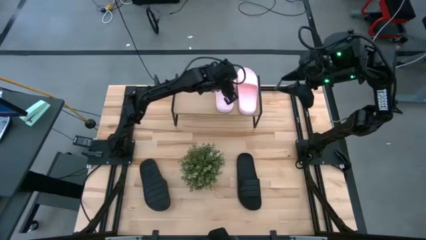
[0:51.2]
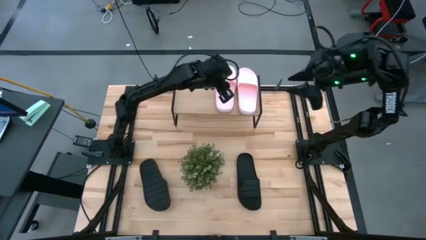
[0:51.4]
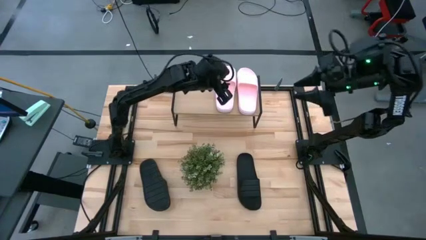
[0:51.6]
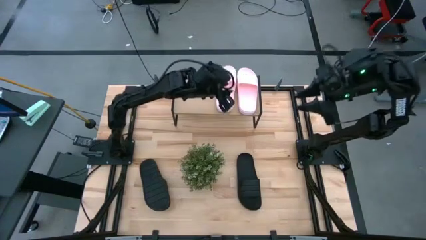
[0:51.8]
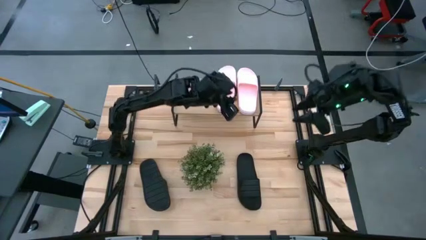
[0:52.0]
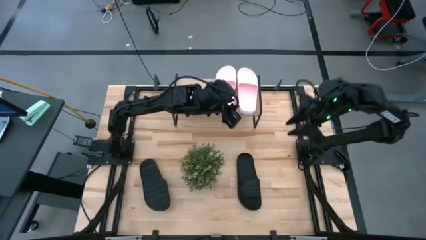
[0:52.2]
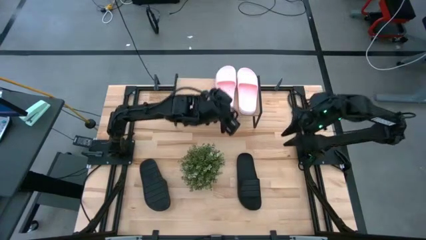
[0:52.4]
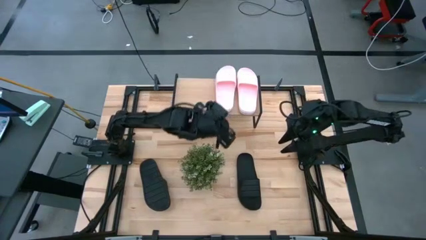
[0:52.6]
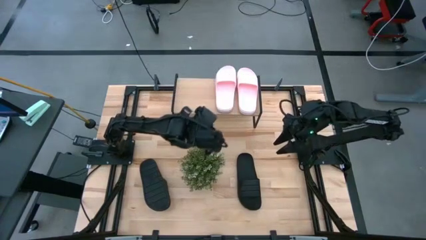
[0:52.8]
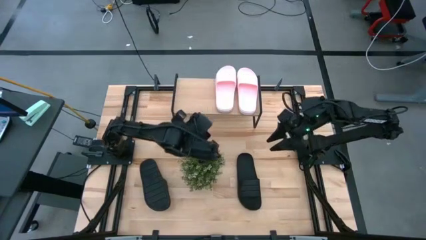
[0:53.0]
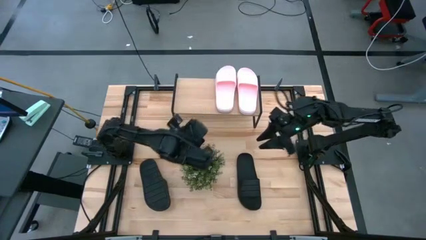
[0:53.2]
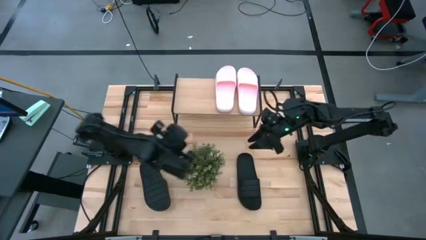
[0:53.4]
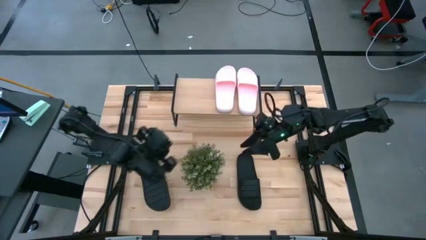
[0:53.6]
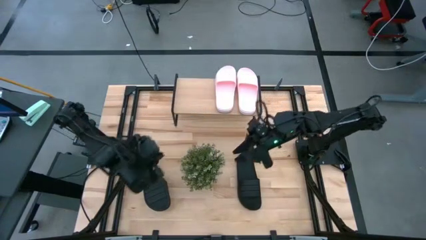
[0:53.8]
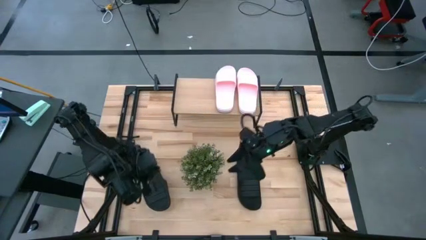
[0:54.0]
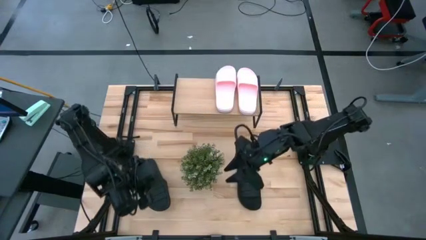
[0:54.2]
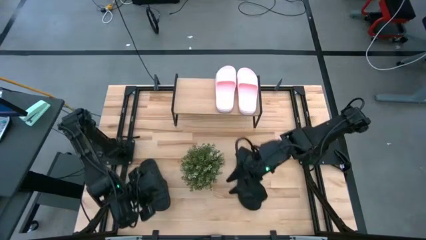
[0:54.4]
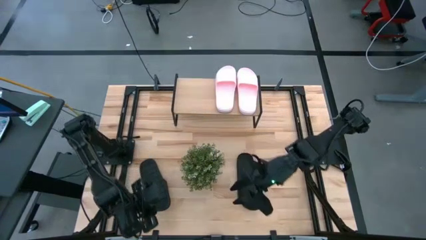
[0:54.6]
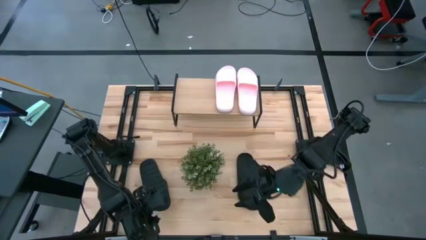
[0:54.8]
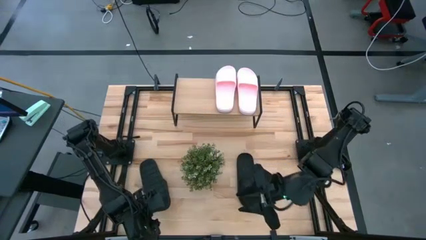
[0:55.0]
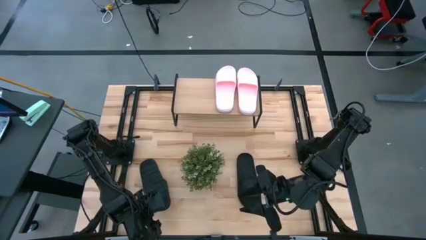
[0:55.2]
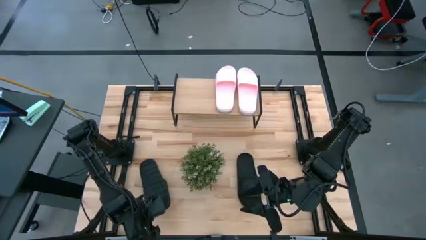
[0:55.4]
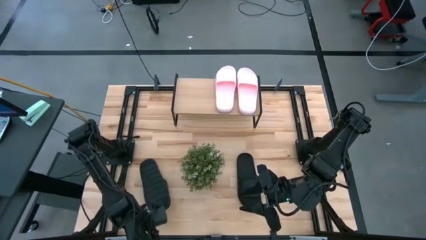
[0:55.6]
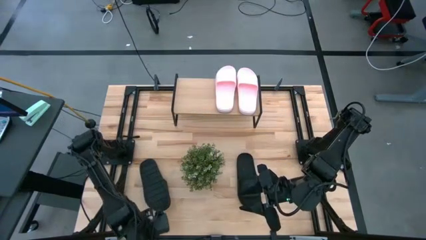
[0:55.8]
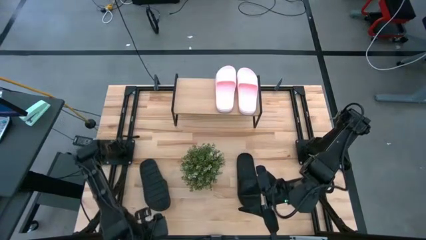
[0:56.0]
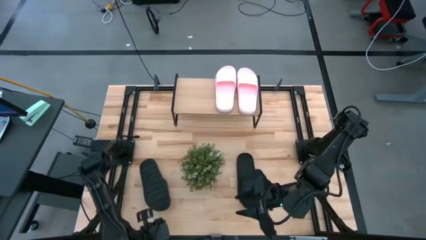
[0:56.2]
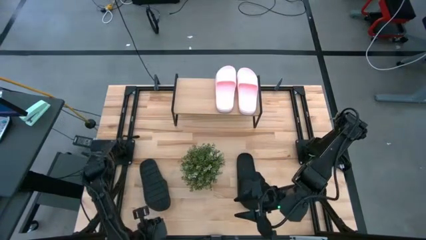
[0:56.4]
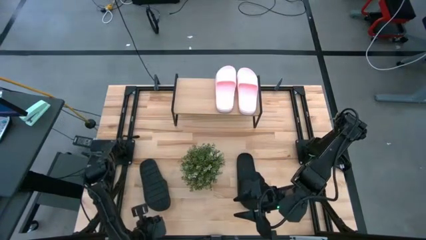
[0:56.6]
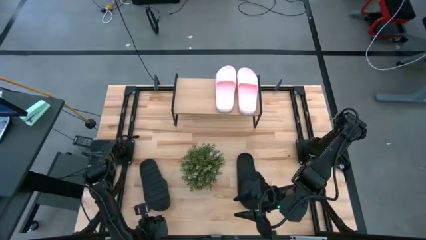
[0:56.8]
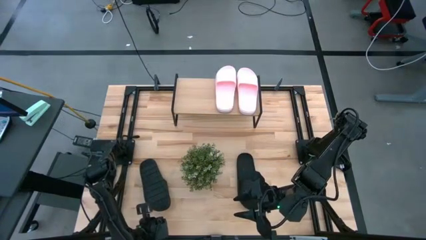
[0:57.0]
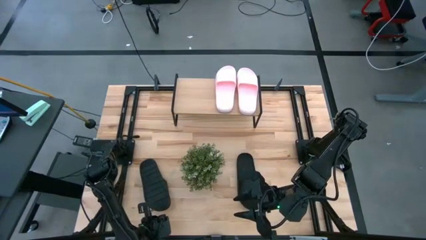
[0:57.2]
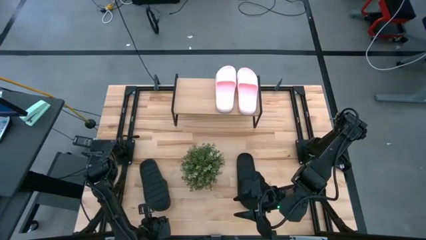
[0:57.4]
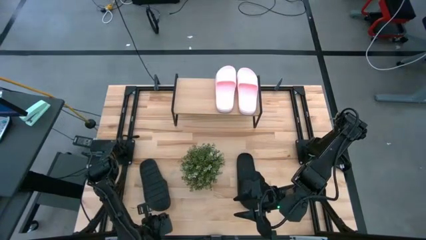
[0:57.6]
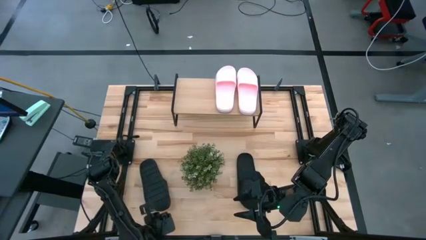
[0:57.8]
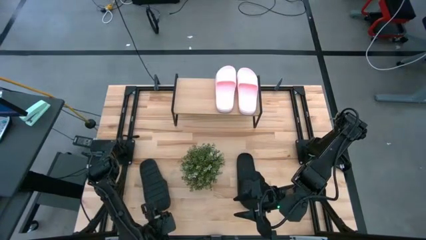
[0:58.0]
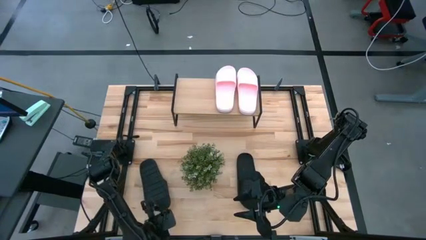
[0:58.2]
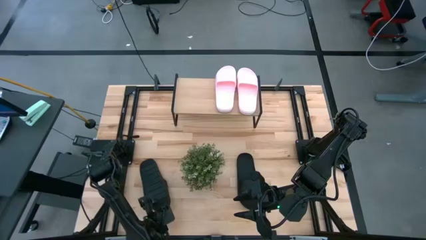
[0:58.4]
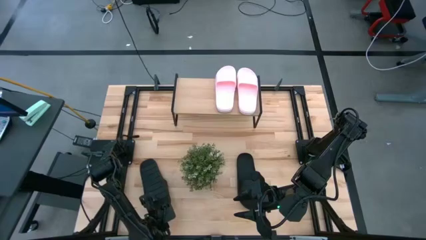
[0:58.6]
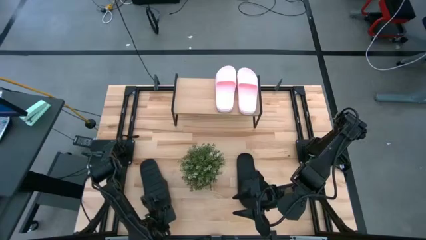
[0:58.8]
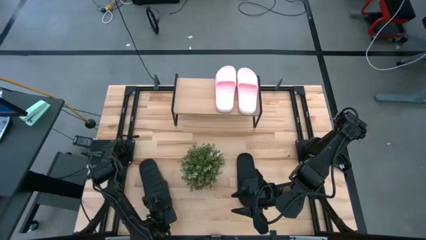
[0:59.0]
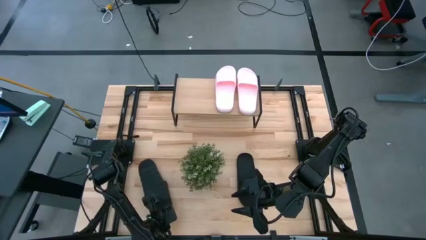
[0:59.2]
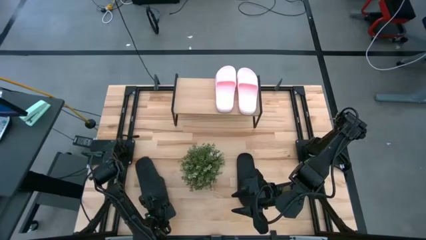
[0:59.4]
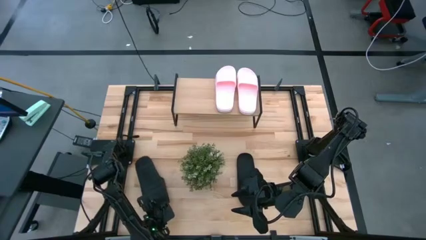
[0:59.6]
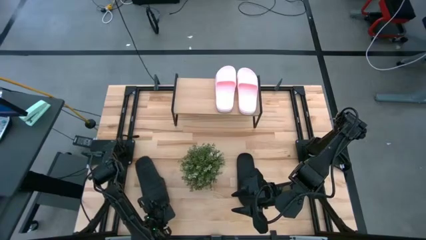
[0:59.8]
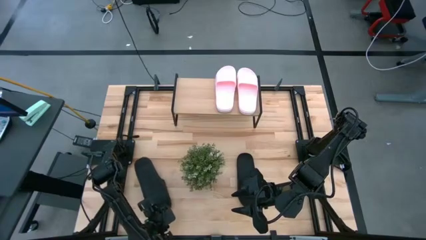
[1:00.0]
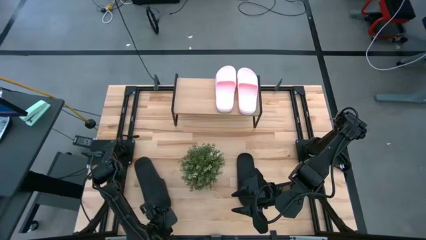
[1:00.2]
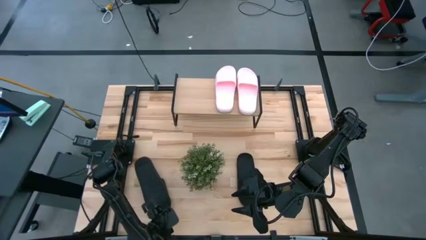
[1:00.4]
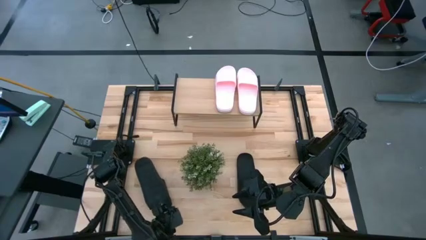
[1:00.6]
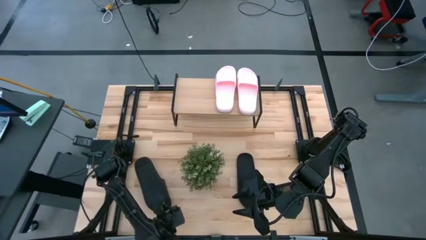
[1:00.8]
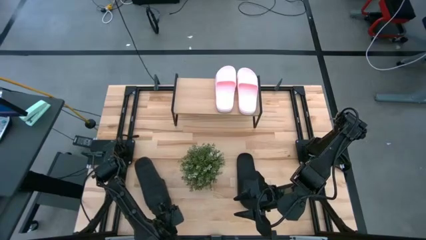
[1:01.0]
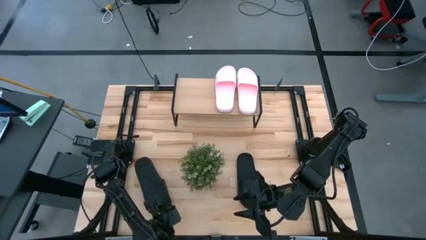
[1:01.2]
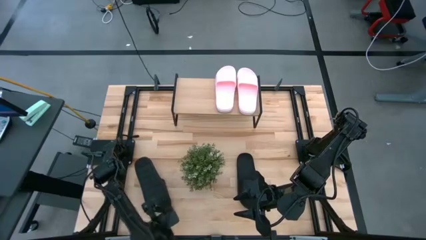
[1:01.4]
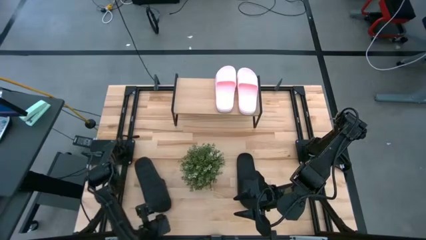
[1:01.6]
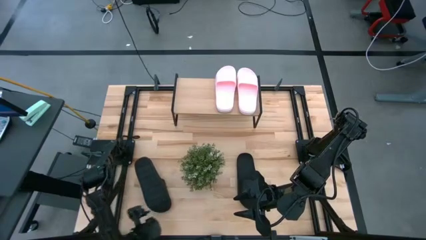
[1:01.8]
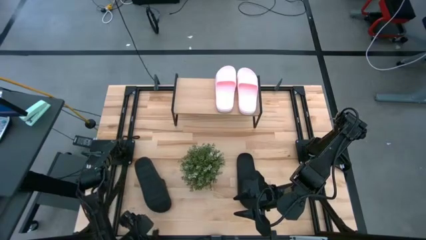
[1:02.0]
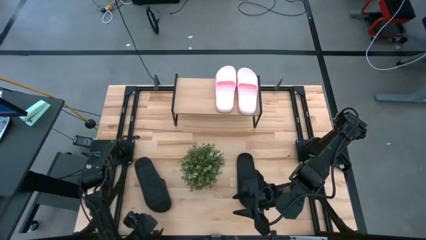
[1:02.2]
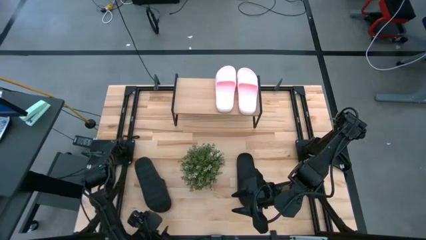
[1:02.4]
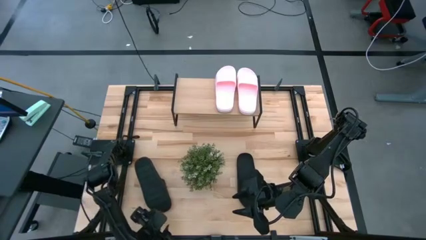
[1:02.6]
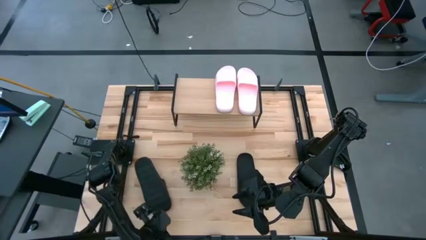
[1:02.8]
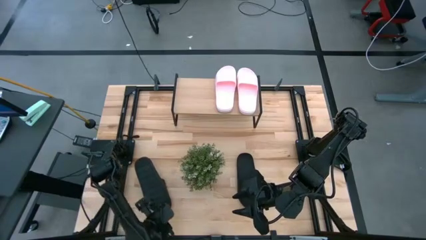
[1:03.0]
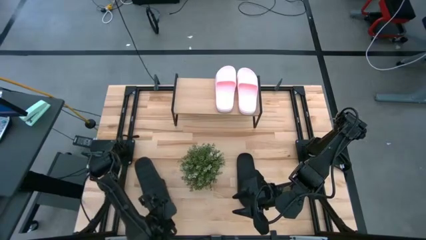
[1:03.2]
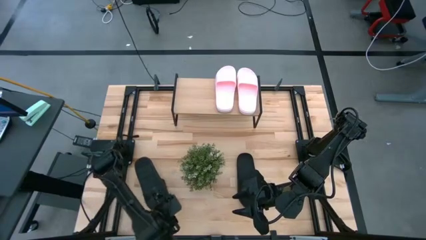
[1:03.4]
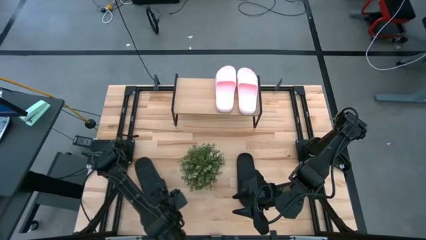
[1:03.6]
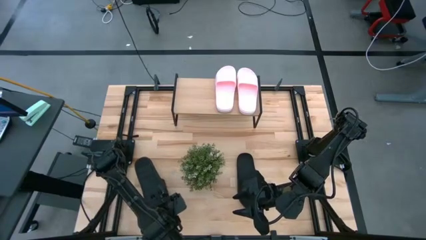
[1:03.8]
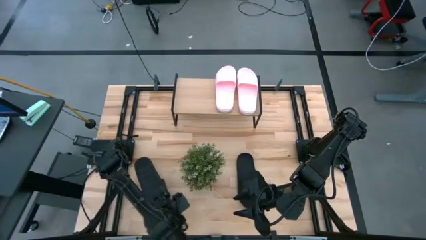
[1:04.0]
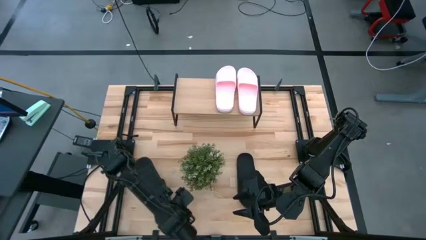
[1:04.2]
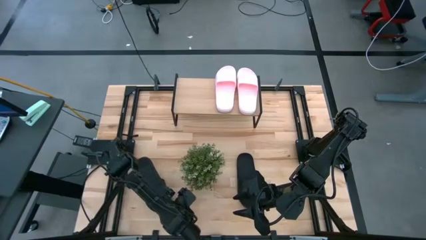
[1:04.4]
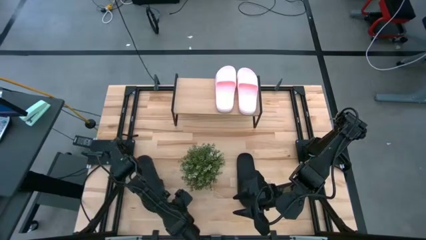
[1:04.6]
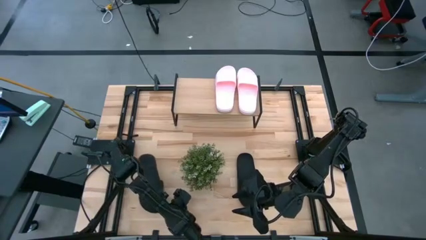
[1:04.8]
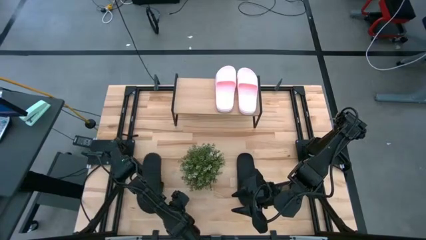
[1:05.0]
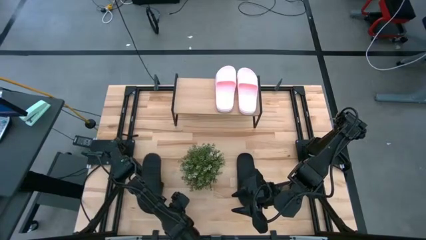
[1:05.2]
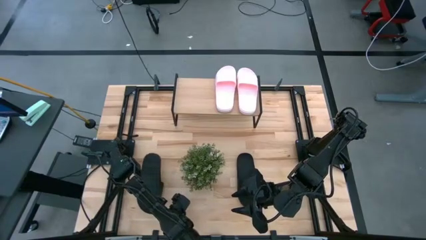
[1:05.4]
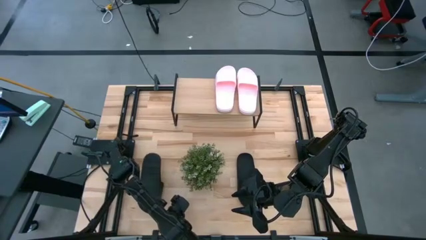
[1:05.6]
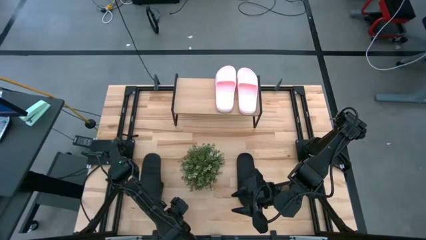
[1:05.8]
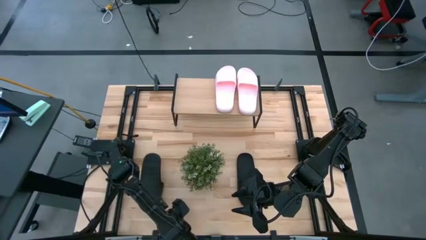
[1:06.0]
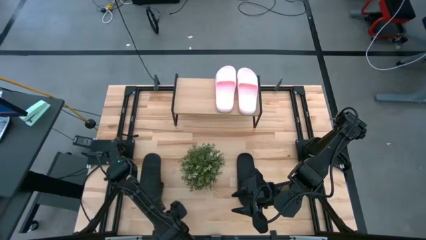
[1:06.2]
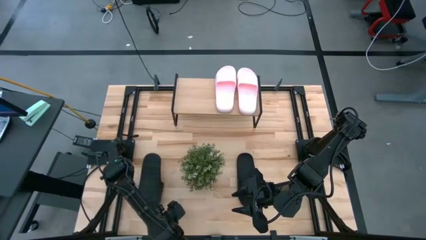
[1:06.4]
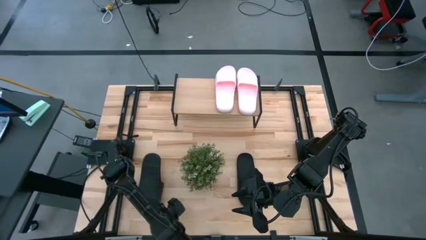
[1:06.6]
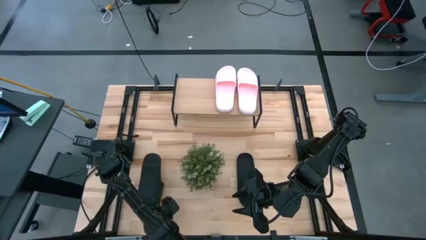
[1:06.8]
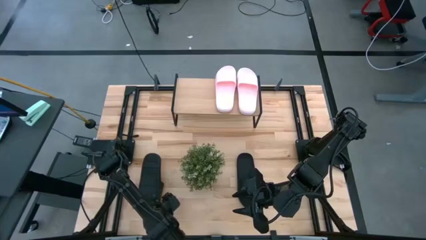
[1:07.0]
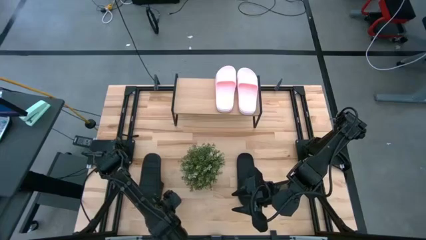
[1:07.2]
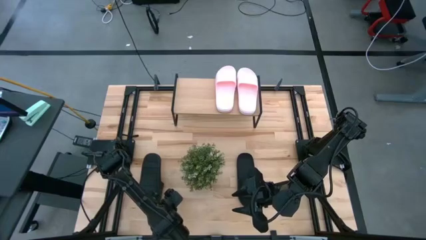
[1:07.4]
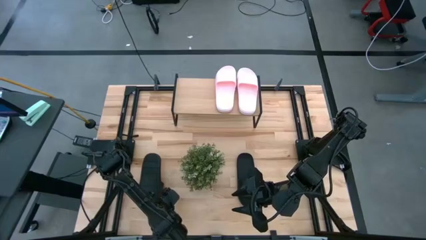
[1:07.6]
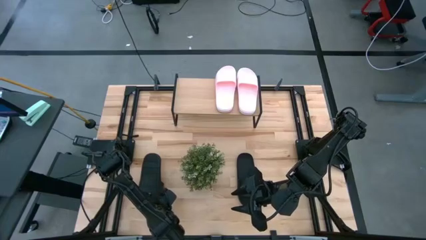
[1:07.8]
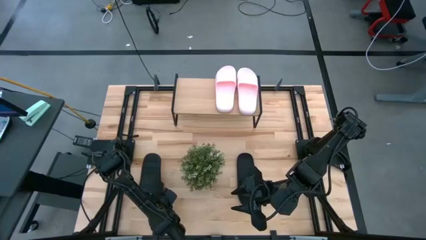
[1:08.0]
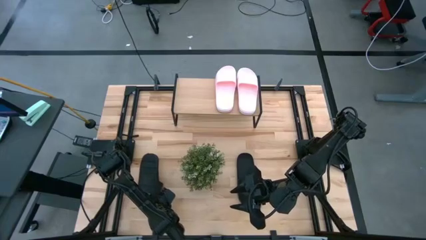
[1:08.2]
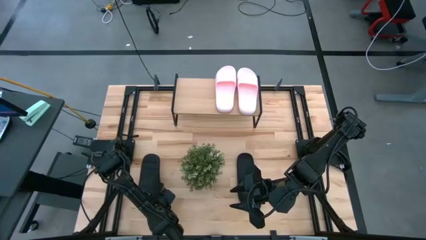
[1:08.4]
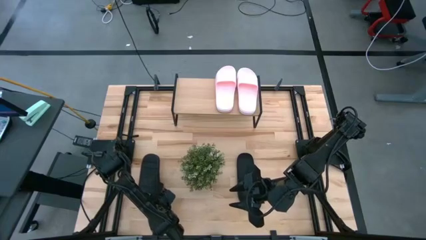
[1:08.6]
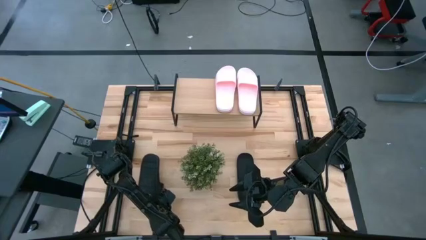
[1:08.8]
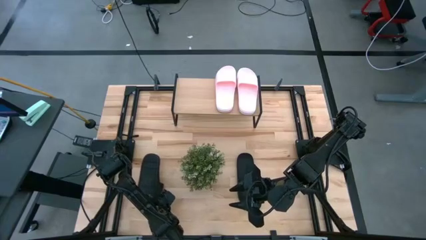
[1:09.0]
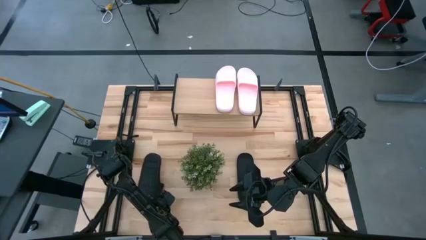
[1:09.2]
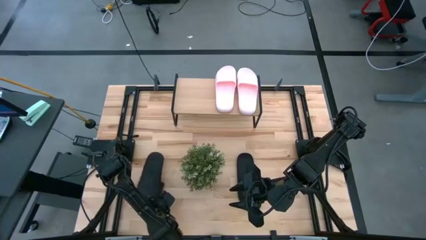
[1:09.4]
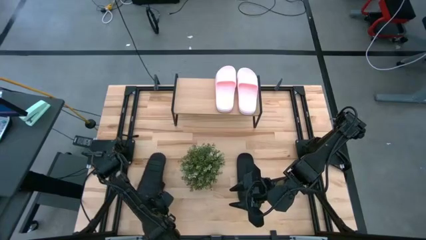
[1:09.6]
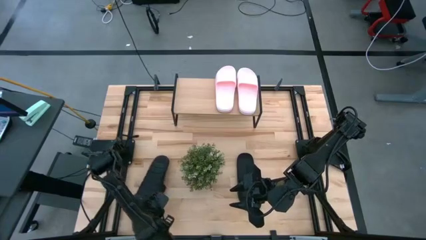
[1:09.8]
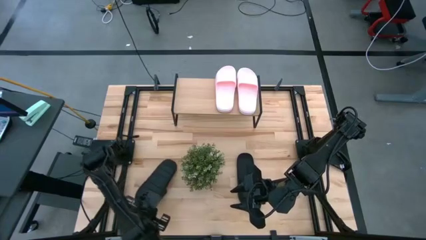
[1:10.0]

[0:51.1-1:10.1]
Task: Pick and place slides into the shelf
Put the left black slipper on the shelf
